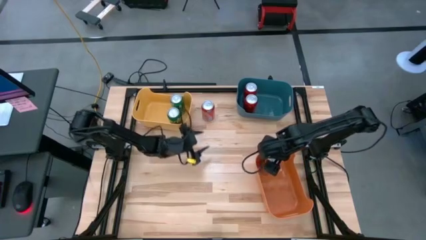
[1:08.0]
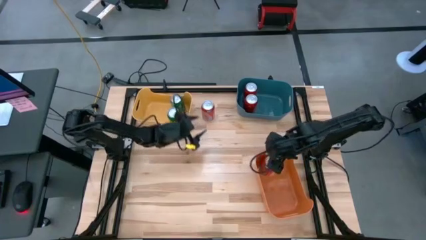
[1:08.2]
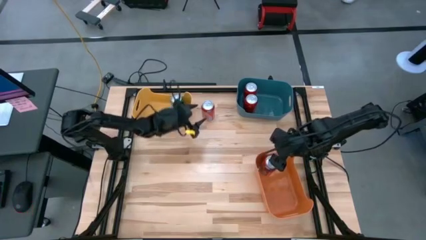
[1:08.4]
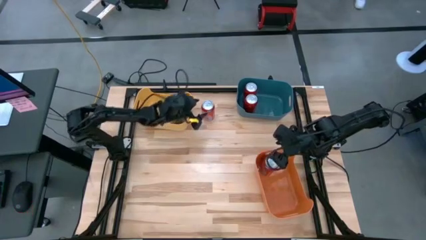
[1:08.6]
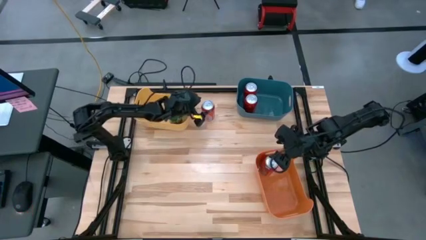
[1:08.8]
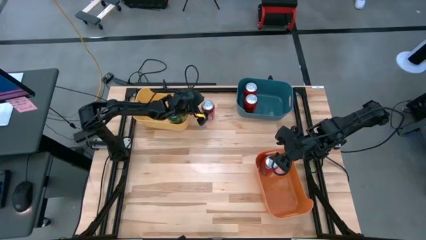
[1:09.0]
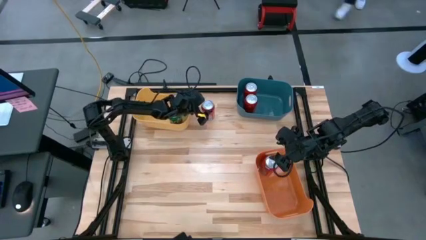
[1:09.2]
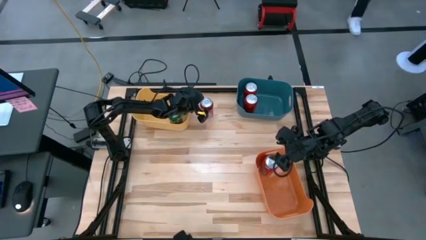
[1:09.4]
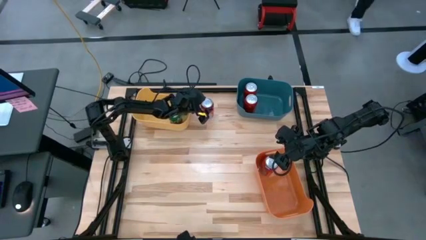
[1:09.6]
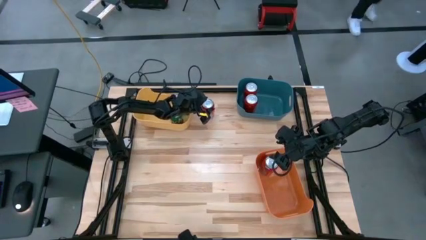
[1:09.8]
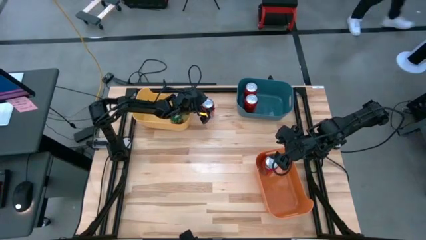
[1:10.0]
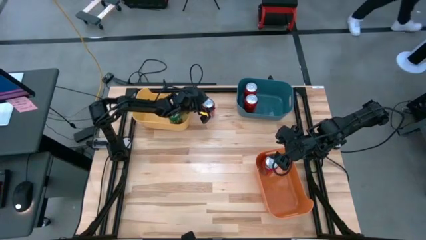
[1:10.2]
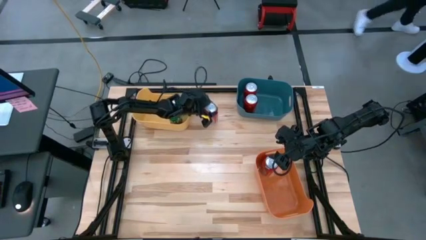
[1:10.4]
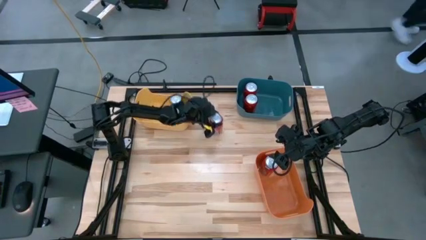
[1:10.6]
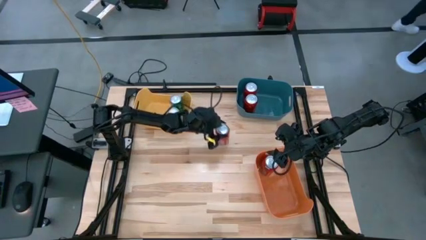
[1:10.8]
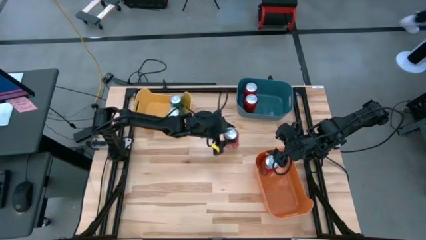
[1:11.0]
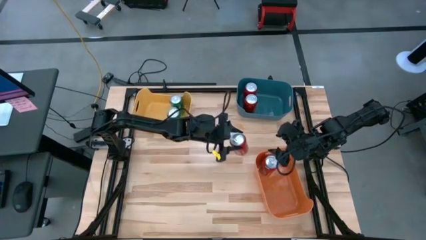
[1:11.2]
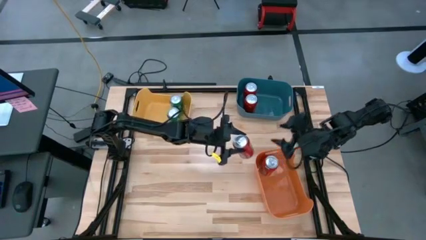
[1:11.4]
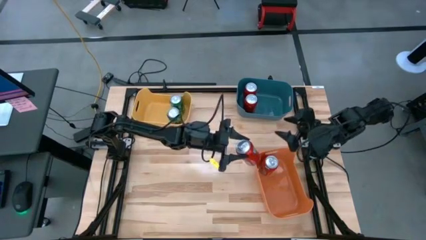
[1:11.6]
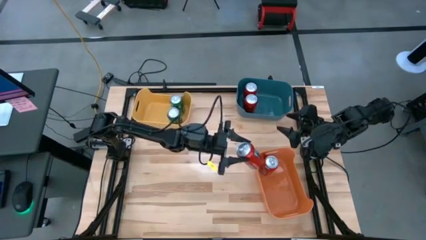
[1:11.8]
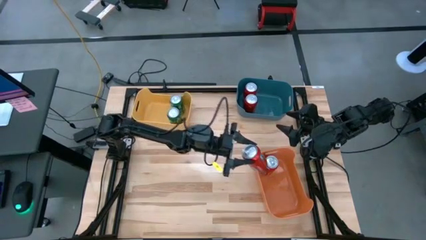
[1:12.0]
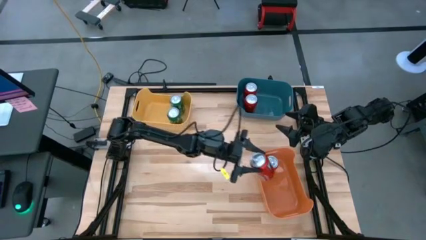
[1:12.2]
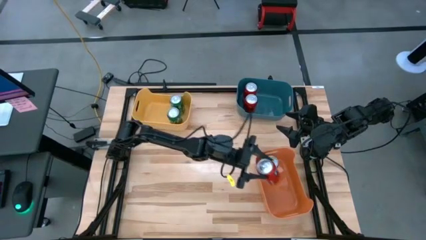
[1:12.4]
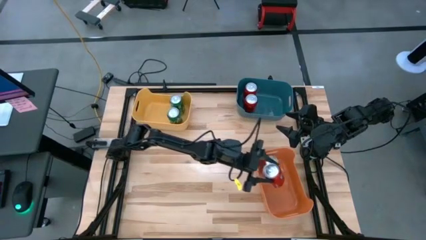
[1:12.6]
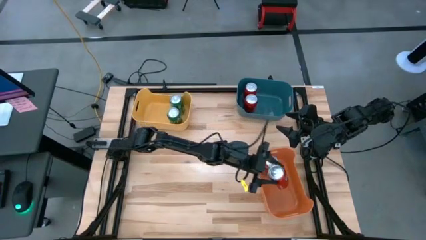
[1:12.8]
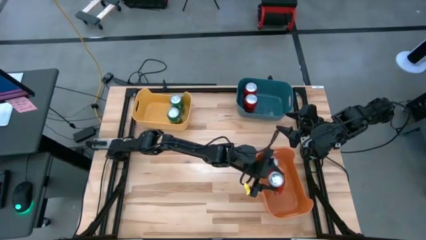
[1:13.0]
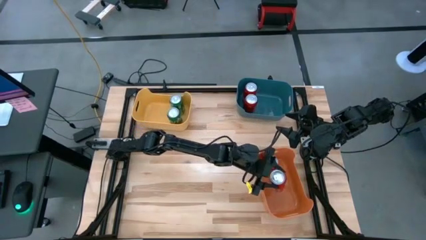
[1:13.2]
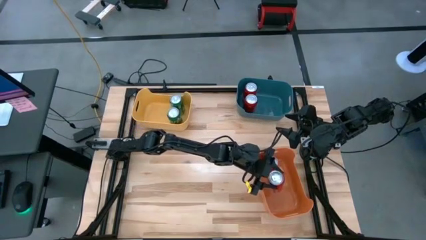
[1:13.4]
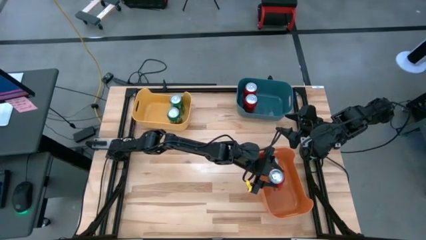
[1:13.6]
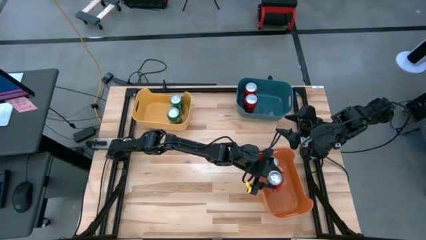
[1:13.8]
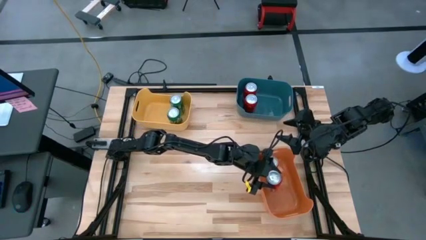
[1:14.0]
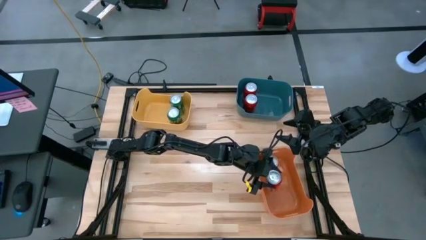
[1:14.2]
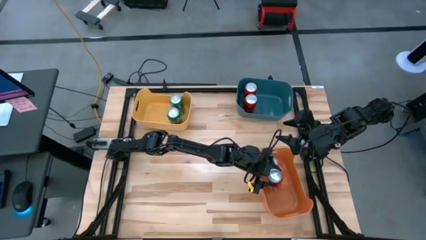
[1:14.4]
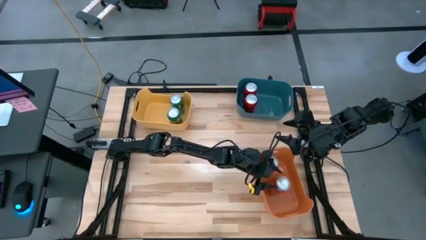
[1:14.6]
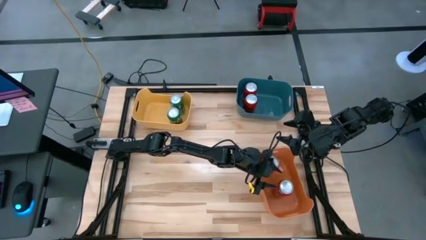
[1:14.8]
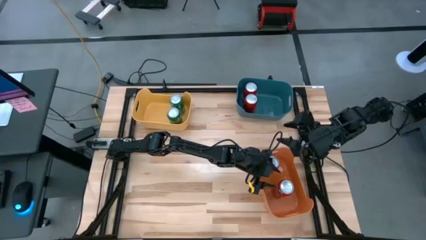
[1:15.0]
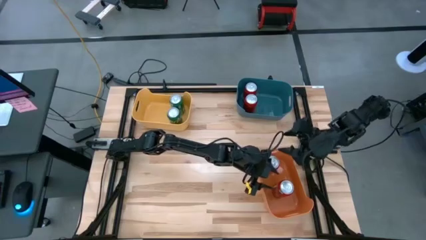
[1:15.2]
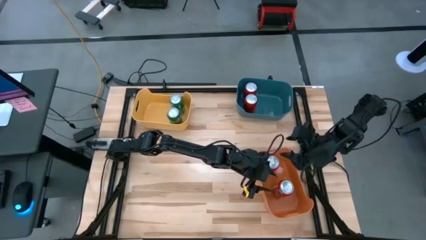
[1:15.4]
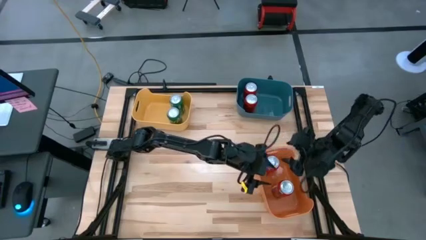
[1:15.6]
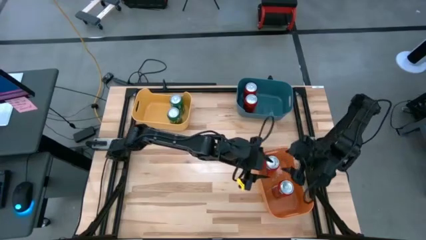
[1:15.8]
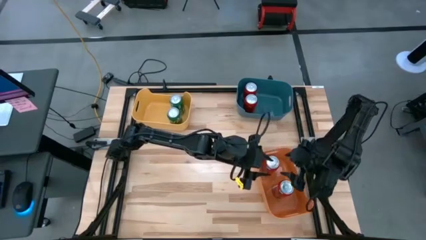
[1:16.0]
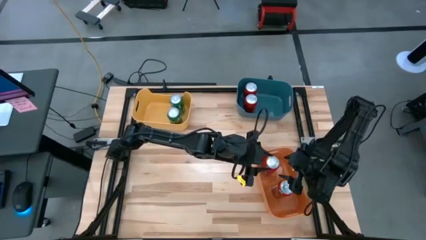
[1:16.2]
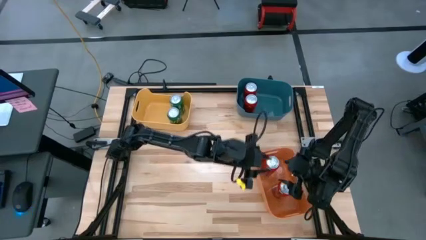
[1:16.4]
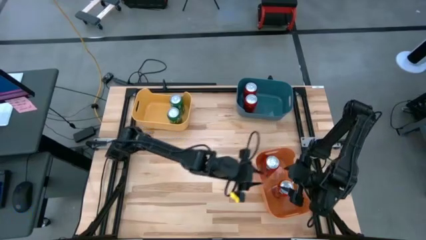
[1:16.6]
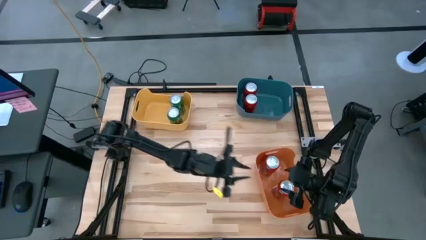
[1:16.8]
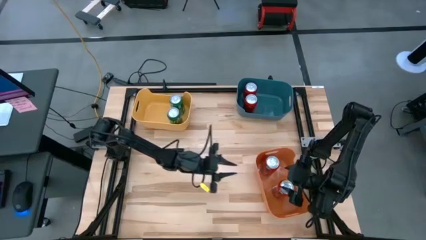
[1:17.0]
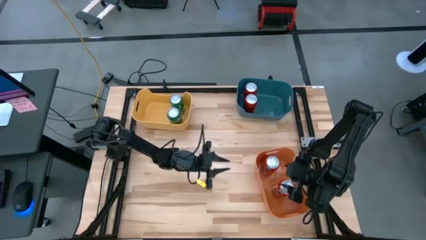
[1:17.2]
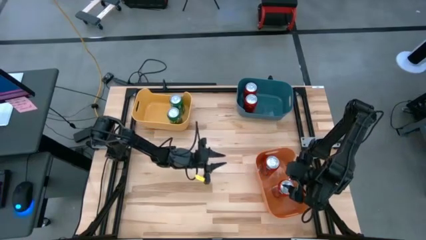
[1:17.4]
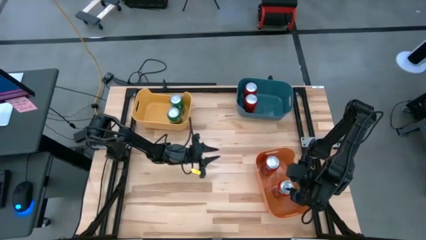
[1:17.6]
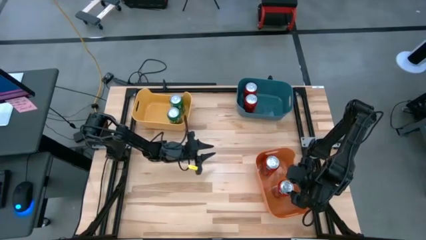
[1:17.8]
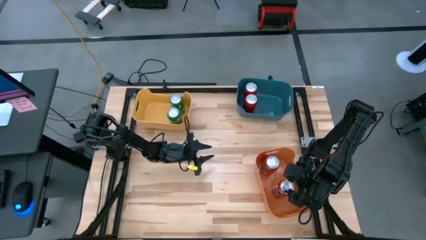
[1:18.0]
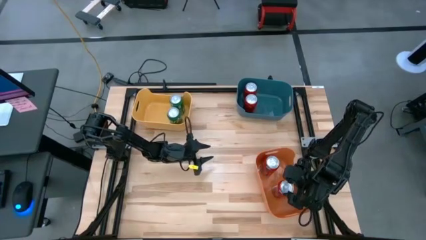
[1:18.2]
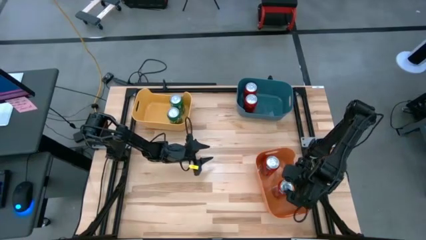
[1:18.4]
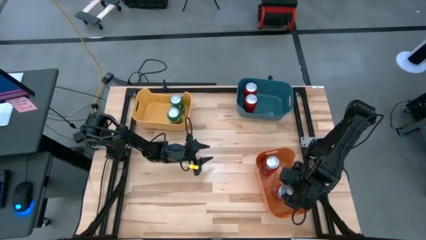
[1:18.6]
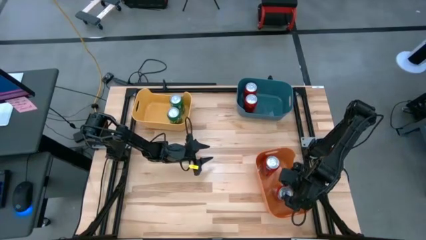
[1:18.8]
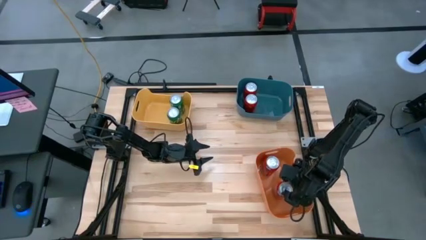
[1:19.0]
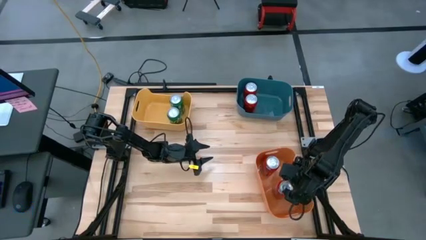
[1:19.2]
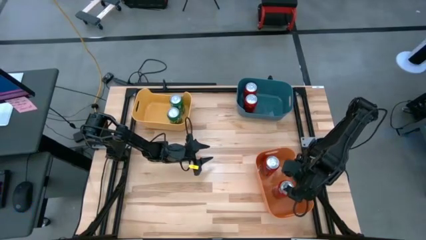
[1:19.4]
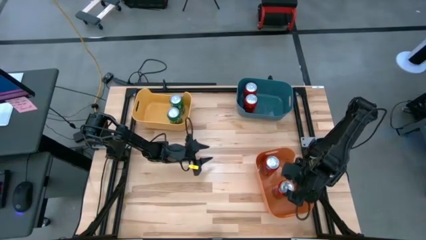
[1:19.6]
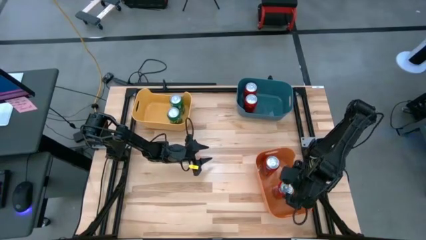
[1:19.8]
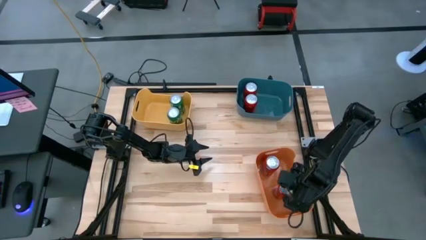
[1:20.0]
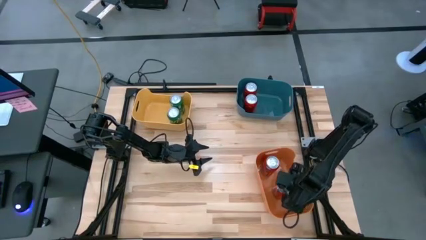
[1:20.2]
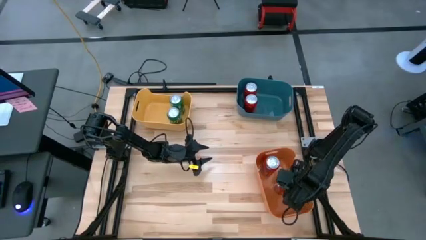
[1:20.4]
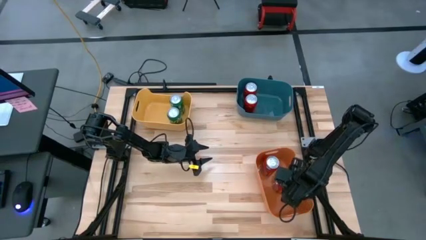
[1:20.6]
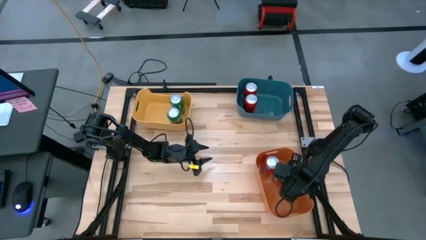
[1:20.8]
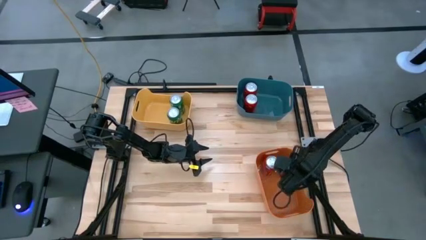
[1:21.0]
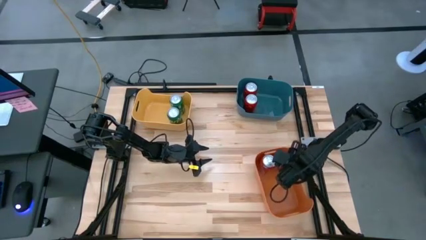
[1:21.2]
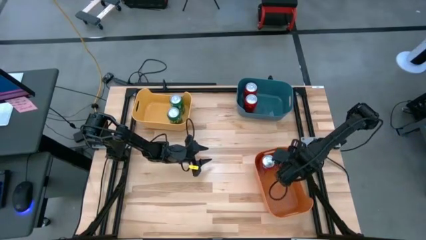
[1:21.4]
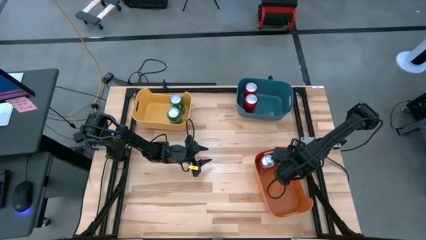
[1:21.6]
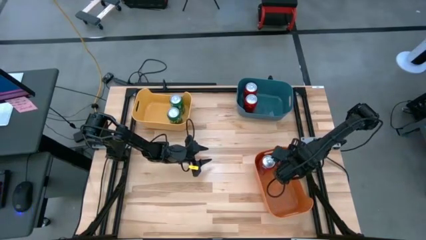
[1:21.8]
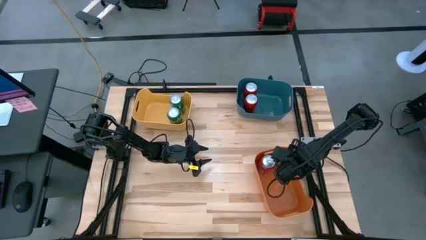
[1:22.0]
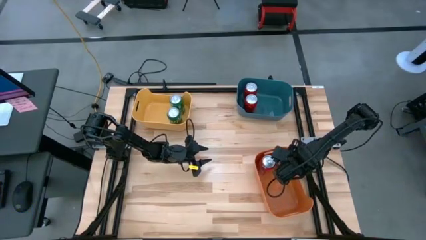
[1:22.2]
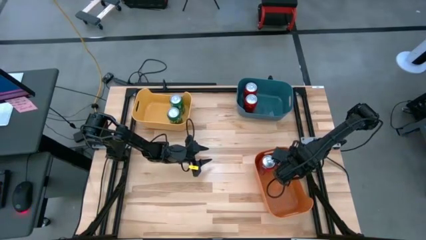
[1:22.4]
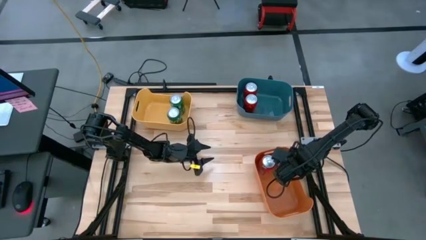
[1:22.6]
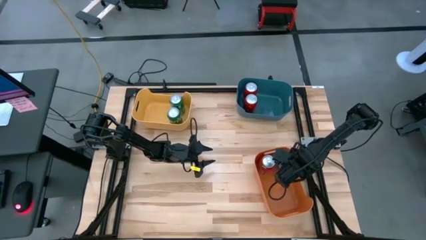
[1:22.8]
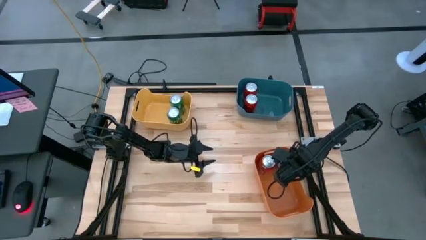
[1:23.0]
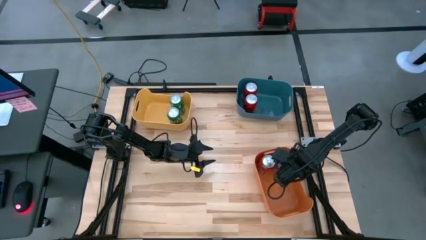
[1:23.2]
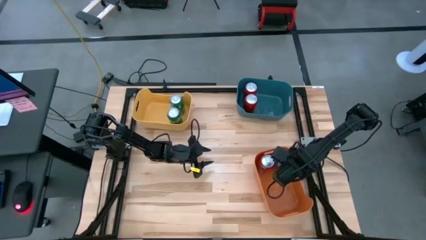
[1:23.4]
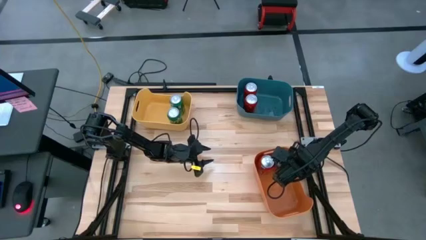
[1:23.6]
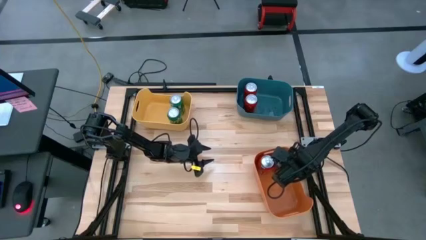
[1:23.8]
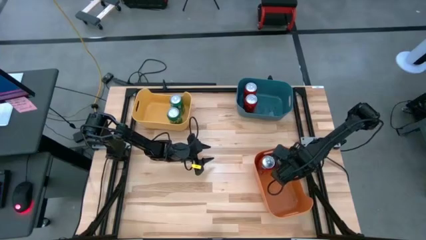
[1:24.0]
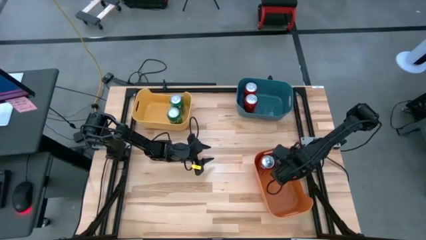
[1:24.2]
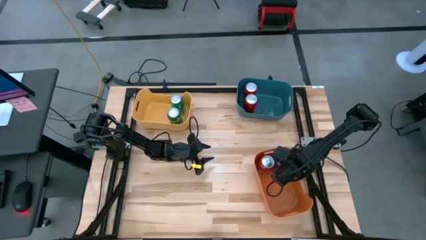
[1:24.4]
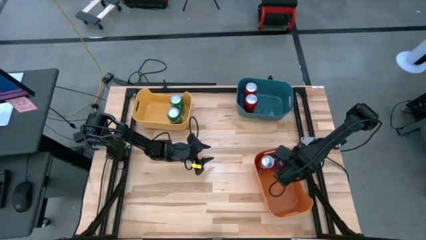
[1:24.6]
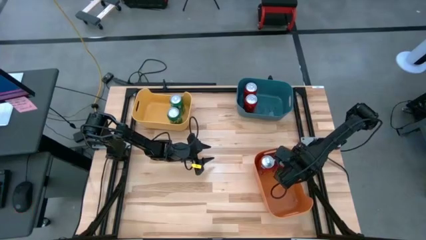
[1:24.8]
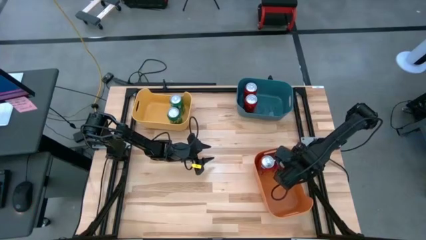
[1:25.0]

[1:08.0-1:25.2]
Task: Sort soda cans
Put the red soda can into the orange bin

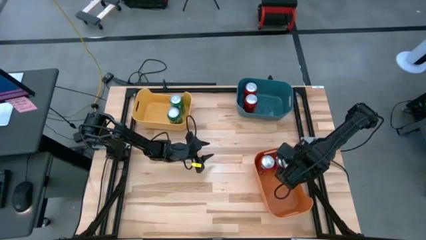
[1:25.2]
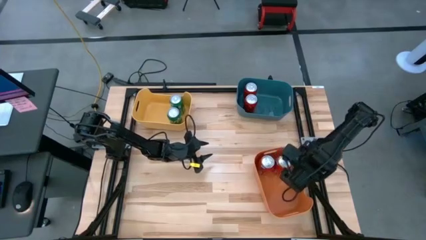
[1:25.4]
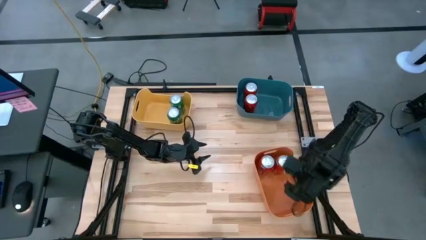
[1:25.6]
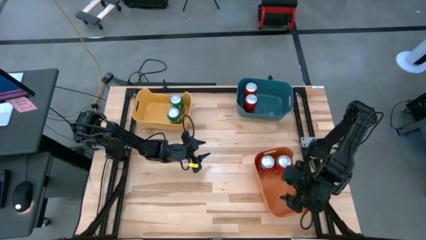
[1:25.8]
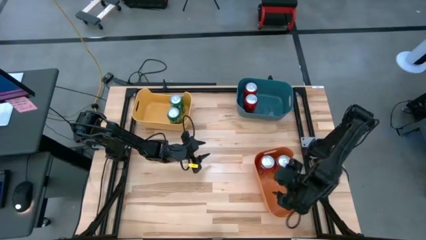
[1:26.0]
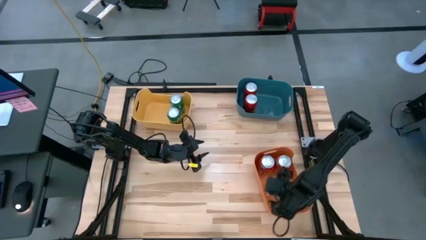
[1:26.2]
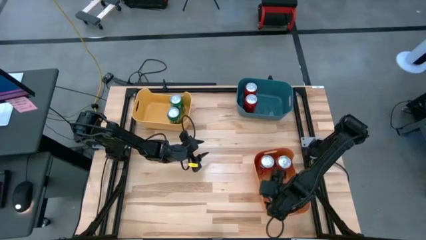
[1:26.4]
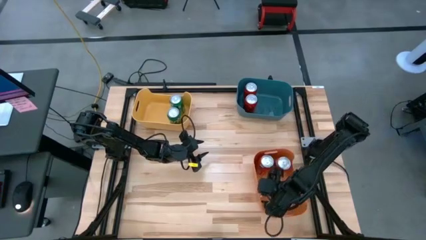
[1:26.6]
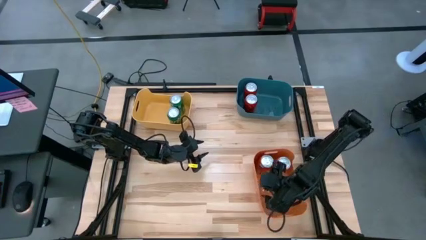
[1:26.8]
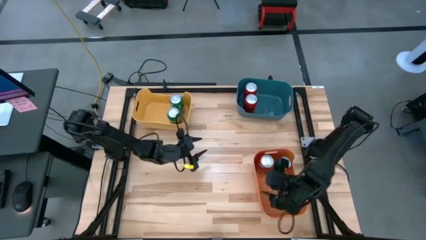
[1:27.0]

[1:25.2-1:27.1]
Adjust the orange bin
